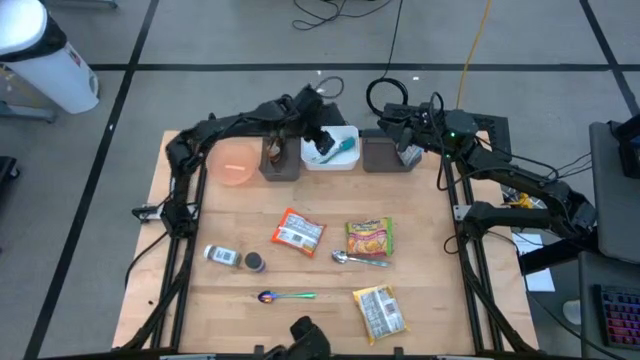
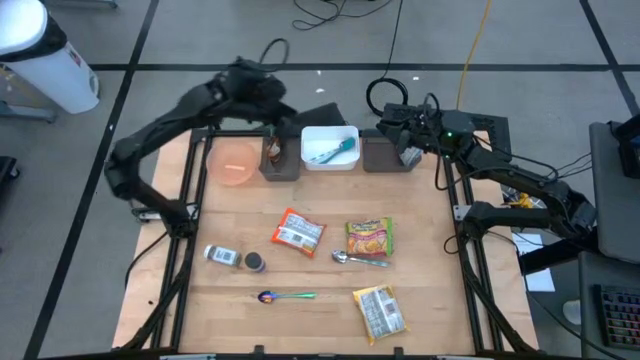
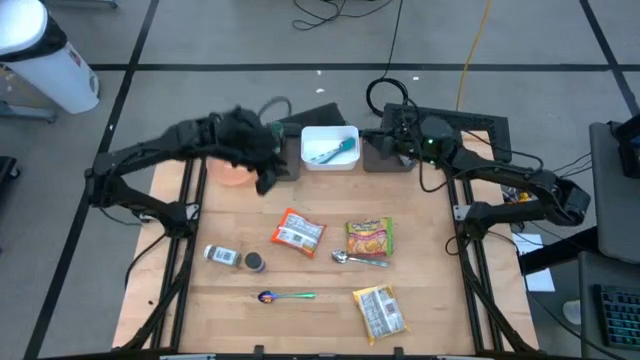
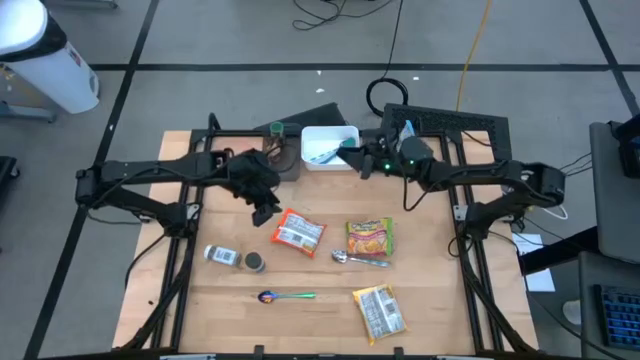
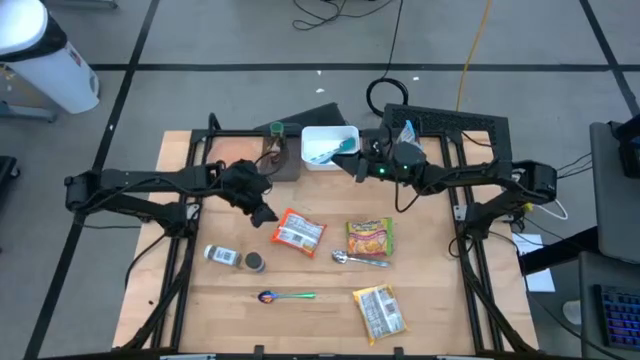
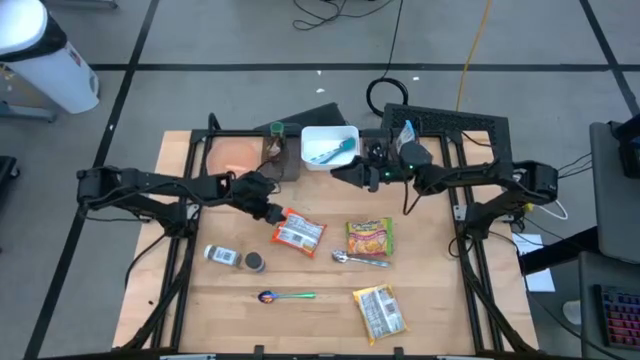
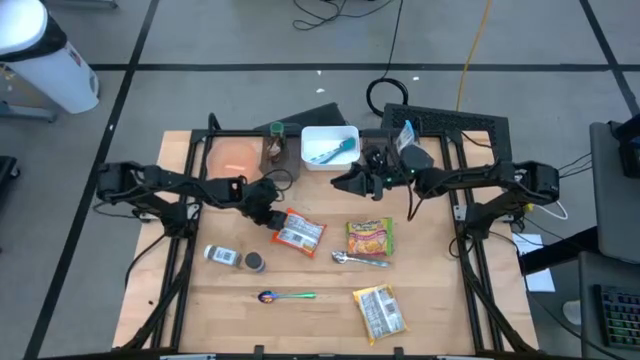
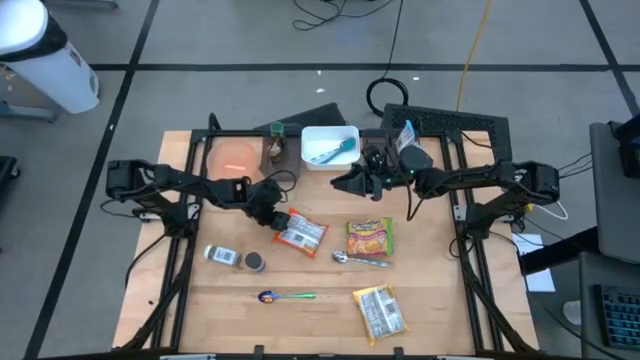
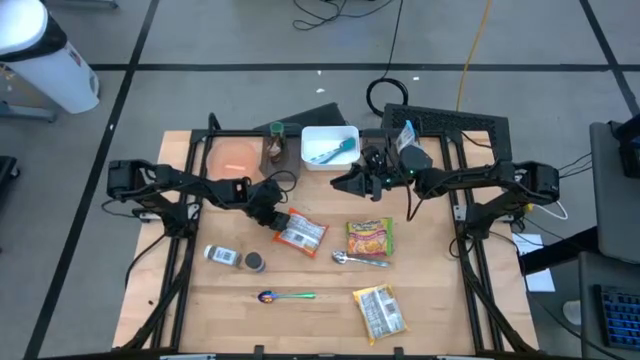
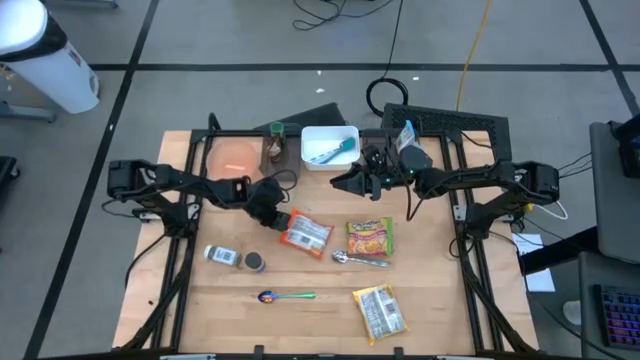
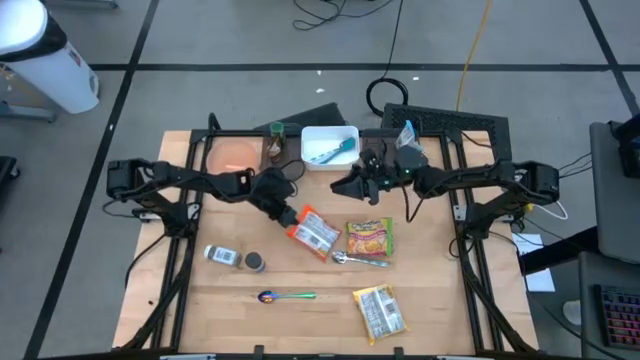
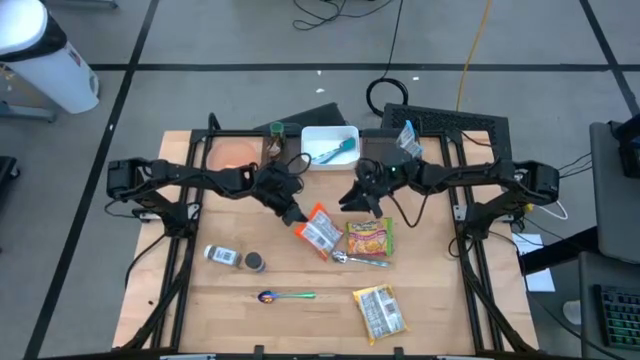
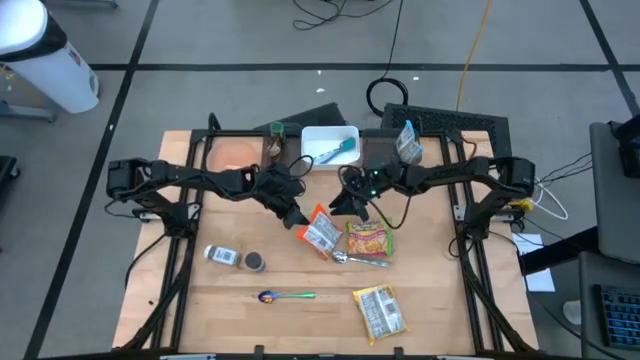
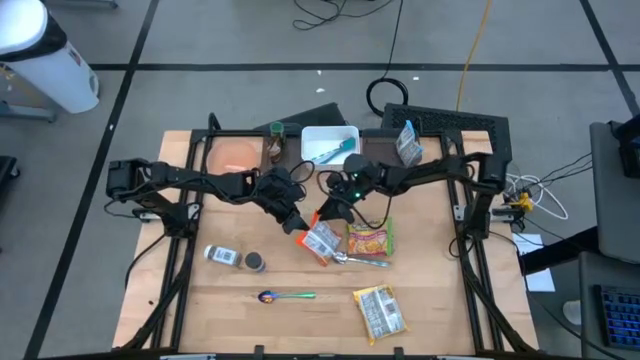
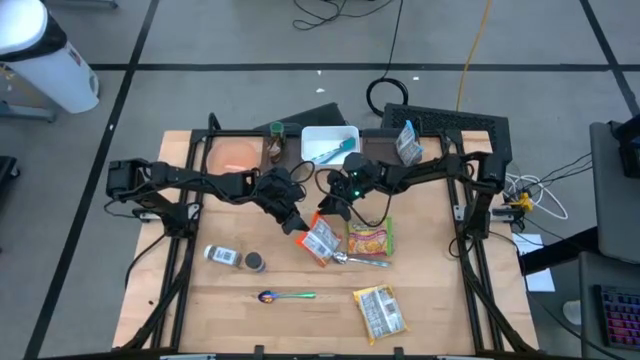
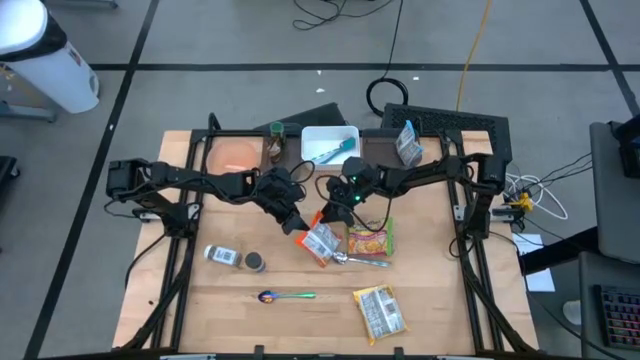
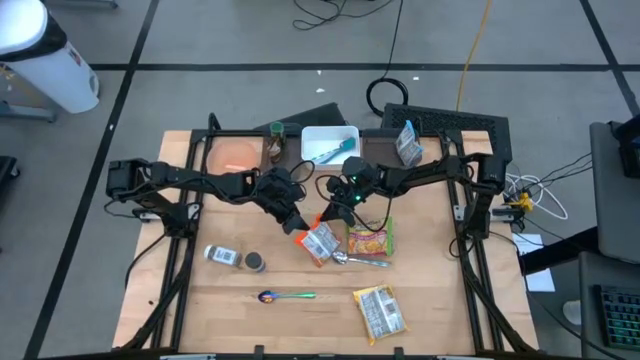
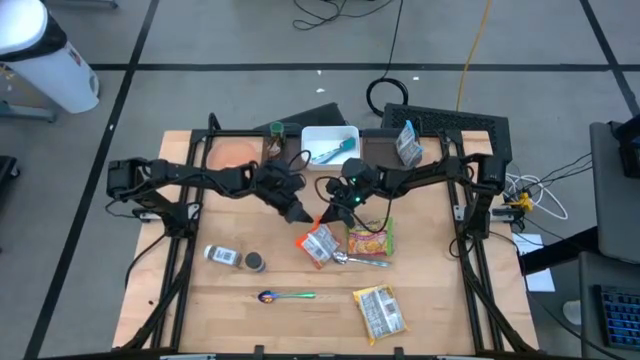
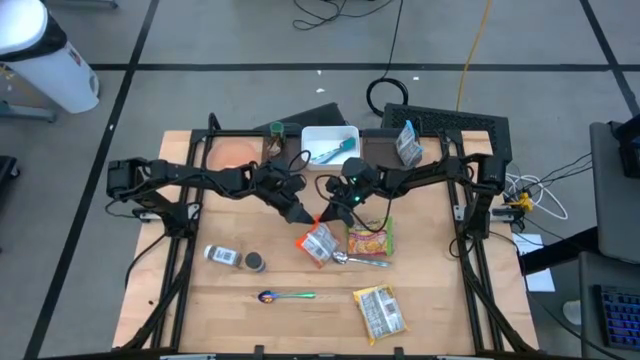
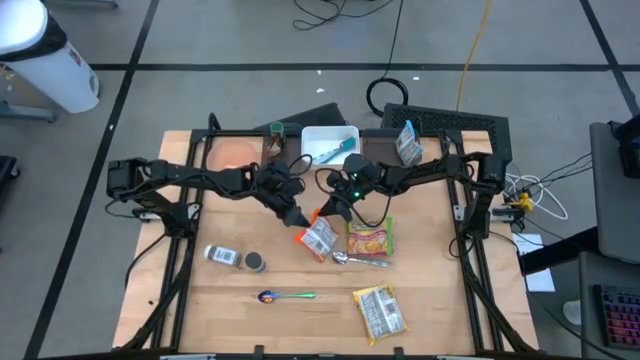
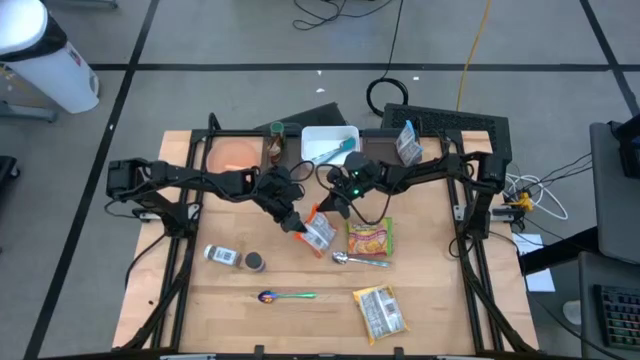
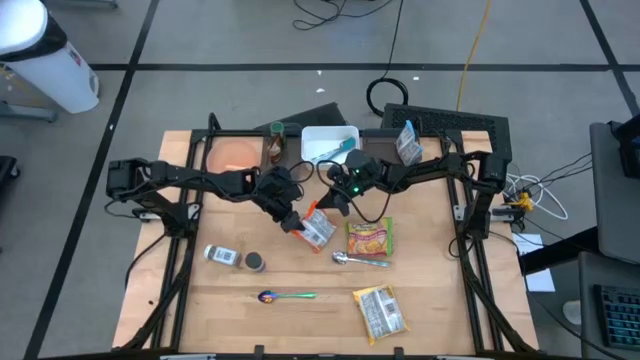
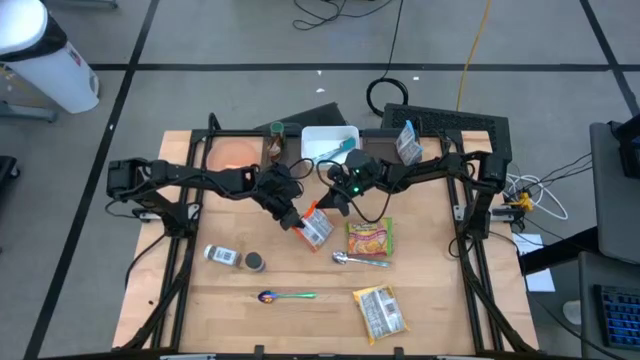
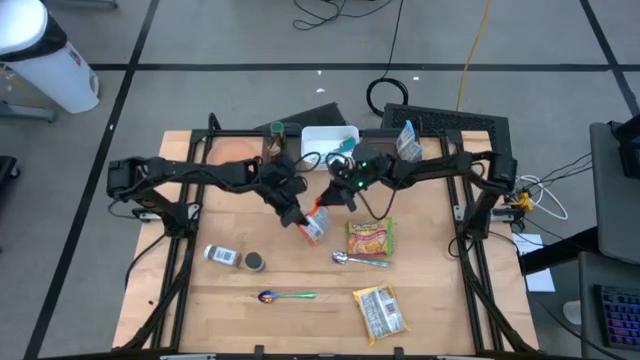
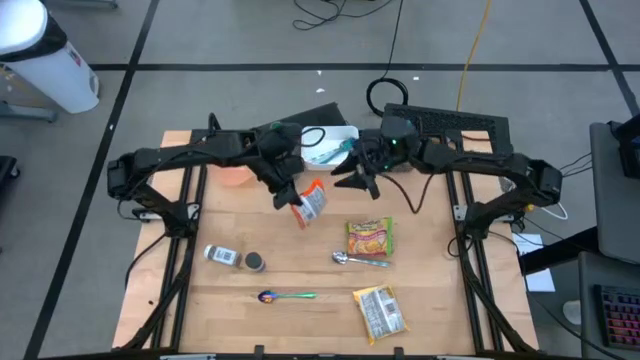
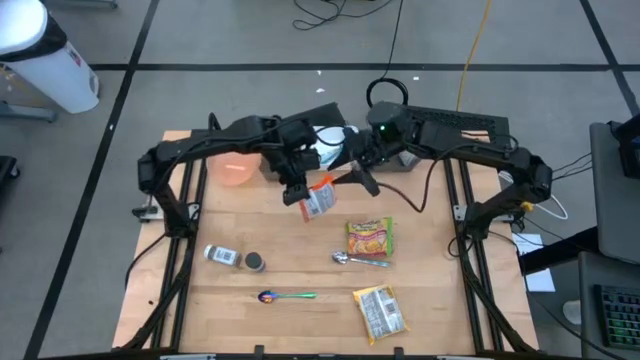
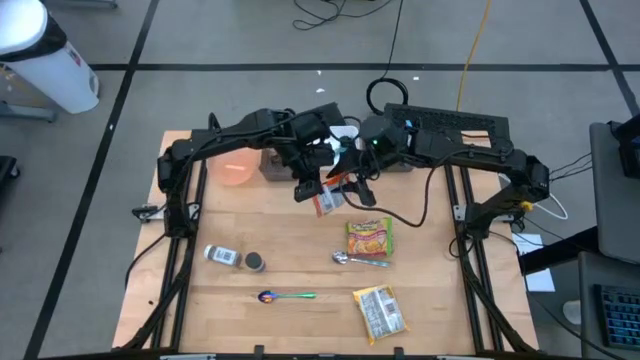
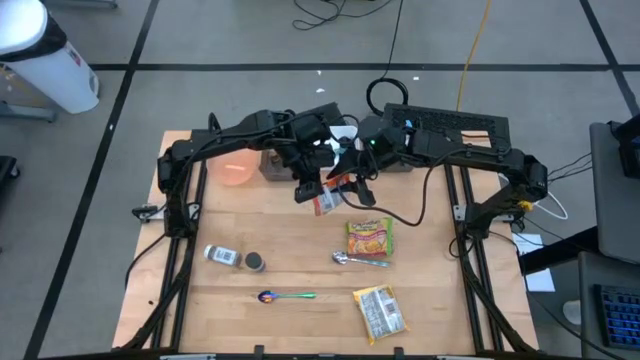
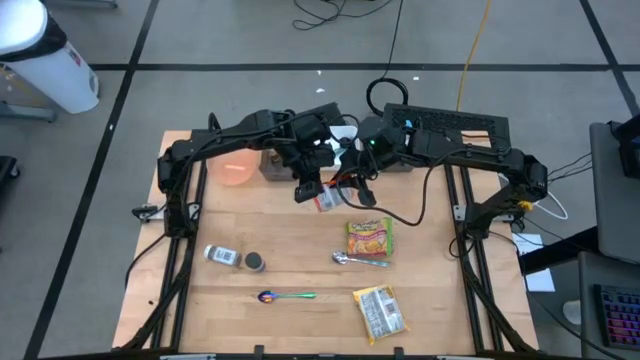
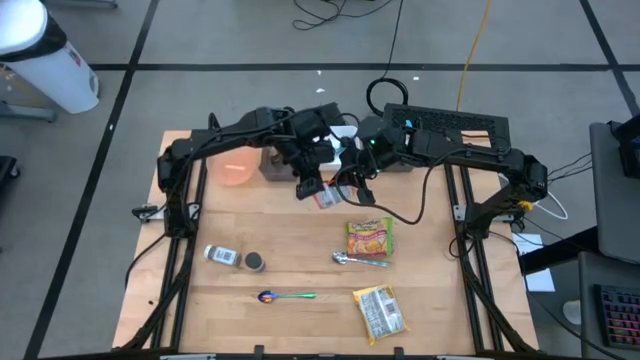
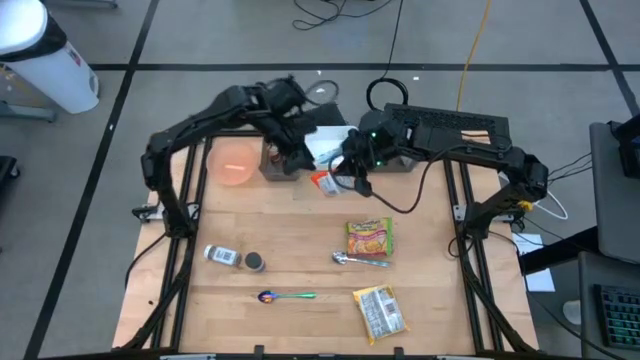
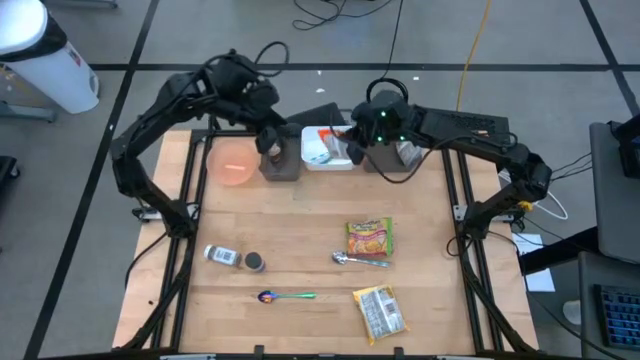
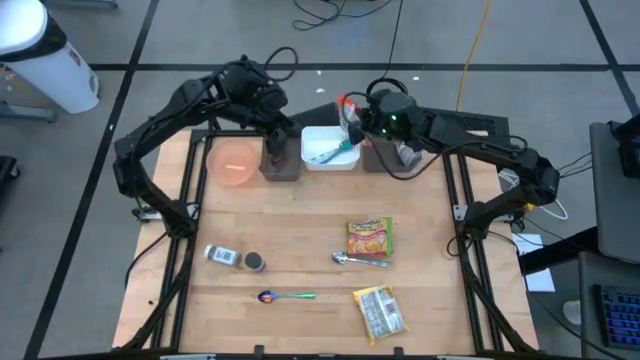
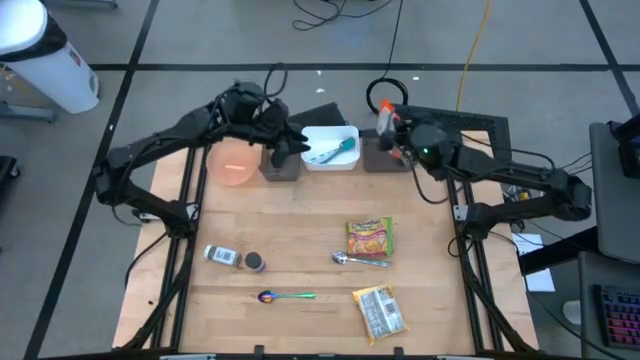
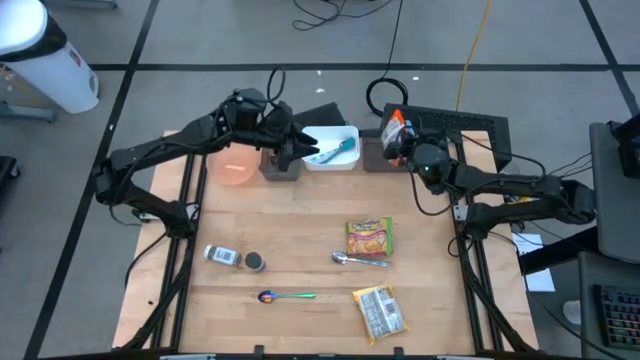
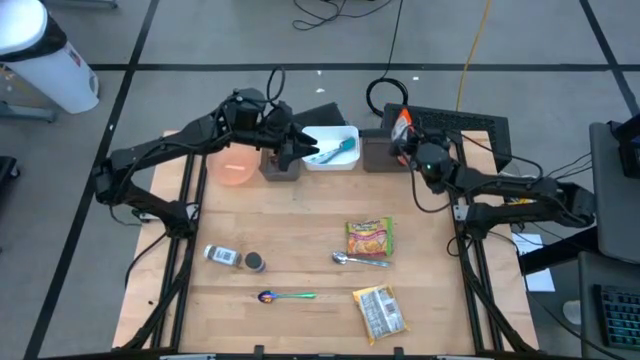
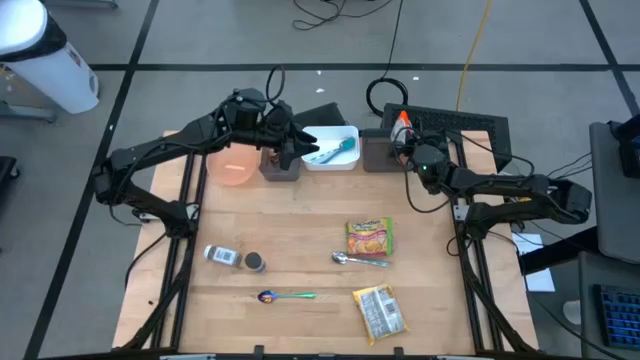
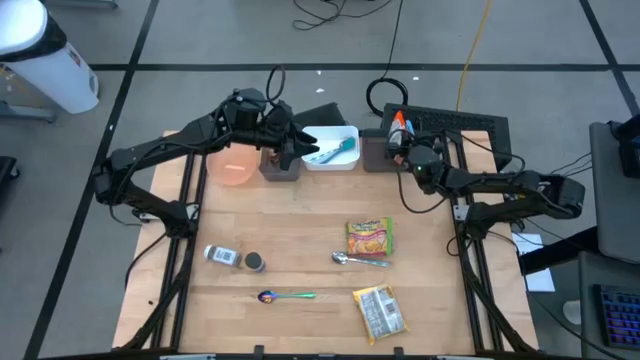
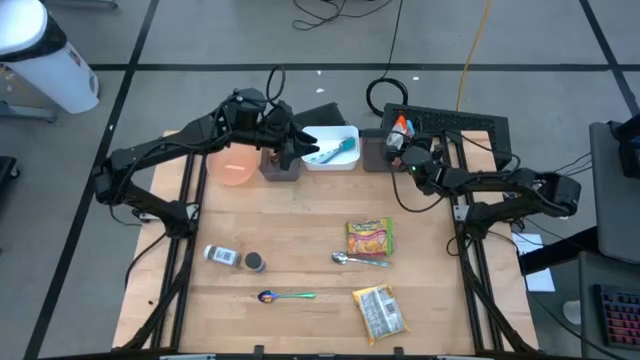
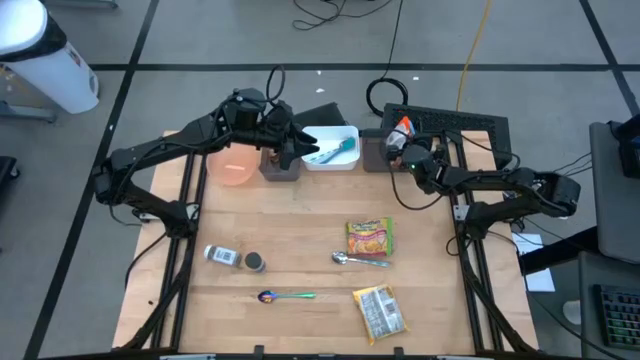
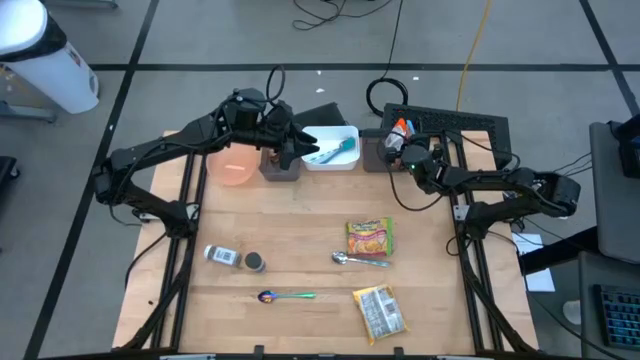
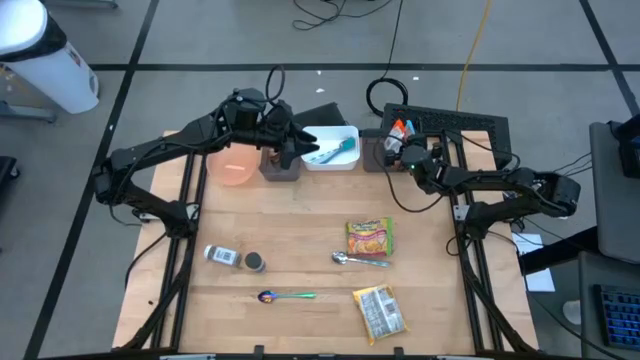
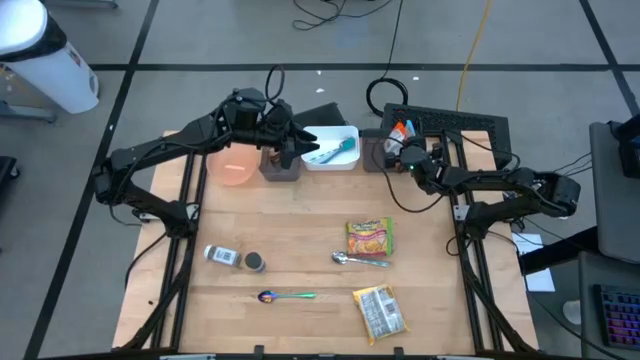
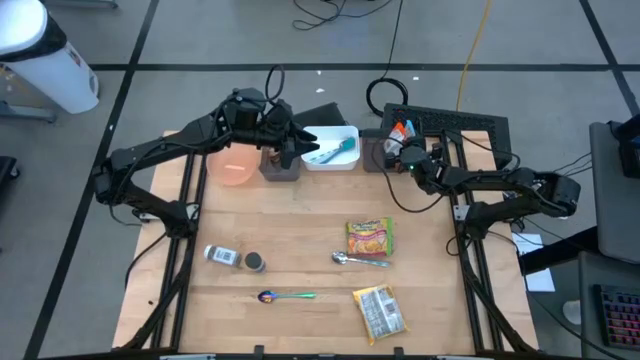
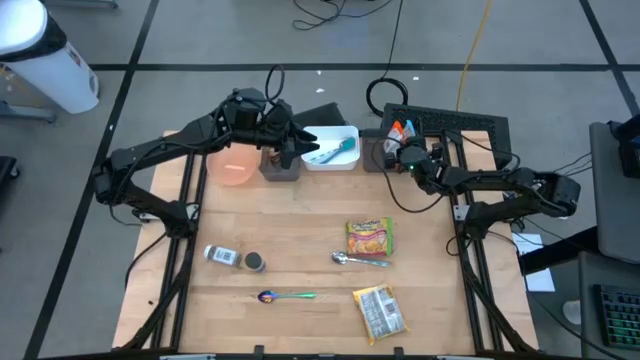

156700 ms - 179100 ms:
Task: Pick & Place Food Item
Put the orange noodle pack into the right black bin
